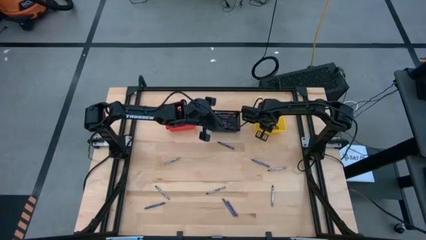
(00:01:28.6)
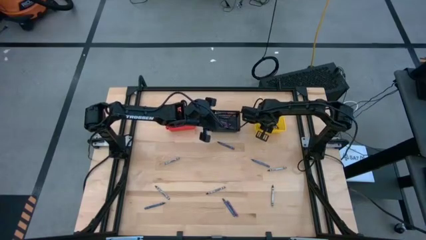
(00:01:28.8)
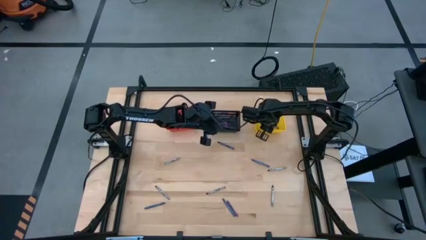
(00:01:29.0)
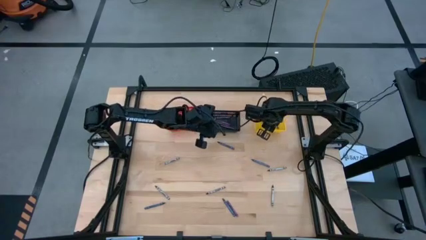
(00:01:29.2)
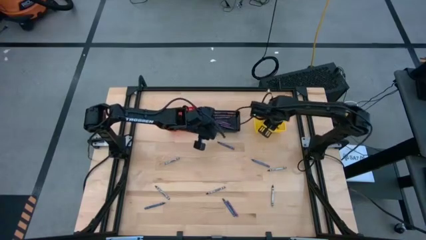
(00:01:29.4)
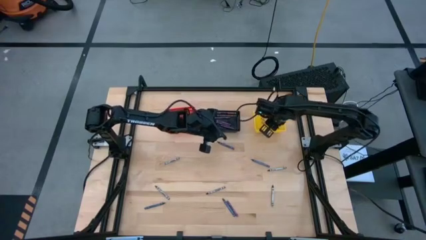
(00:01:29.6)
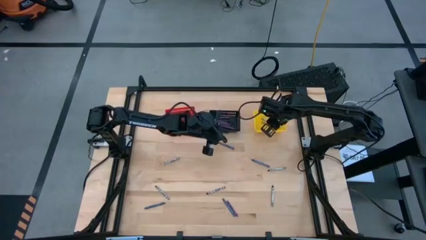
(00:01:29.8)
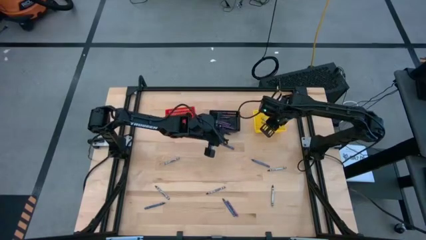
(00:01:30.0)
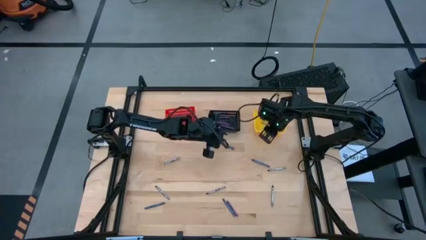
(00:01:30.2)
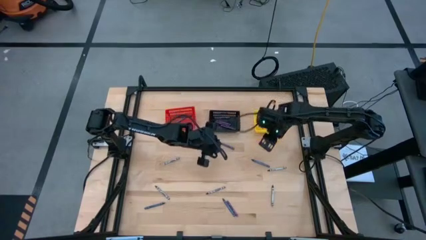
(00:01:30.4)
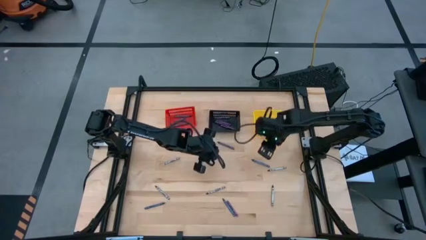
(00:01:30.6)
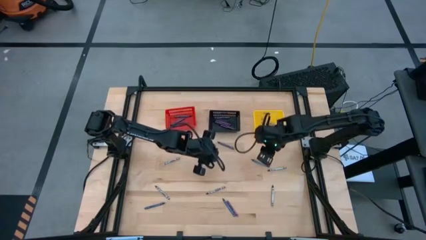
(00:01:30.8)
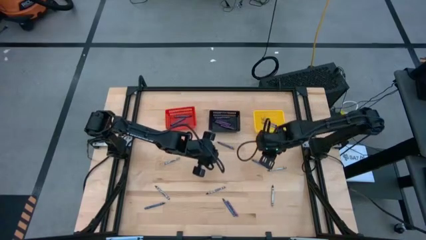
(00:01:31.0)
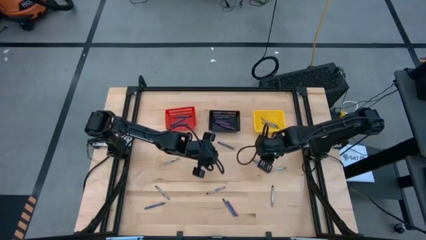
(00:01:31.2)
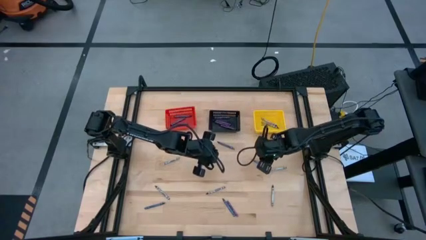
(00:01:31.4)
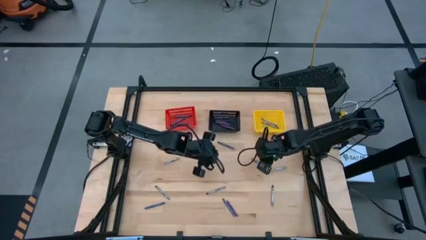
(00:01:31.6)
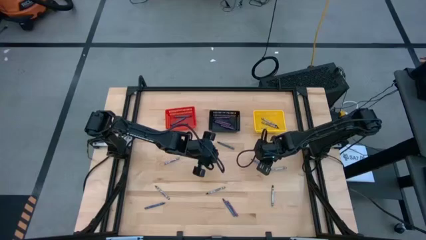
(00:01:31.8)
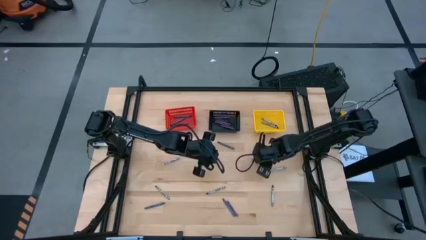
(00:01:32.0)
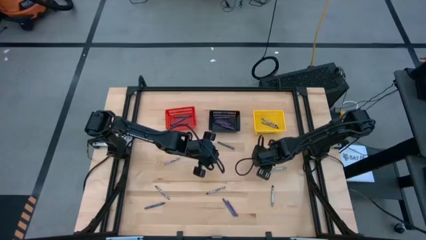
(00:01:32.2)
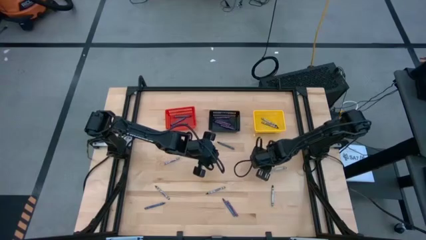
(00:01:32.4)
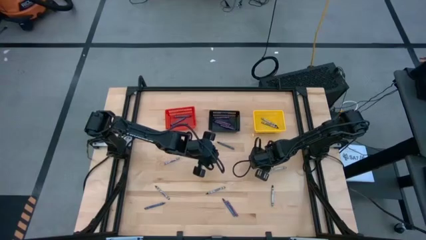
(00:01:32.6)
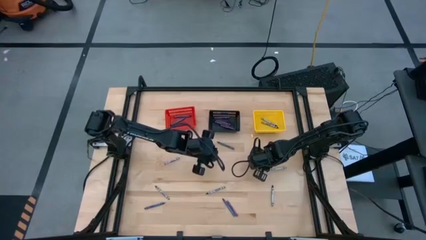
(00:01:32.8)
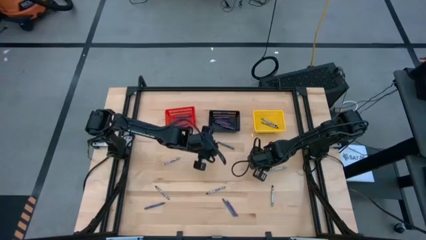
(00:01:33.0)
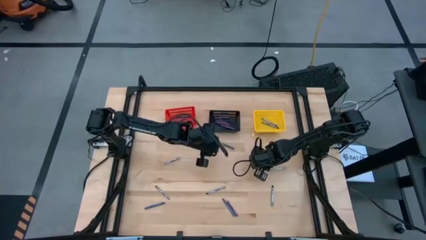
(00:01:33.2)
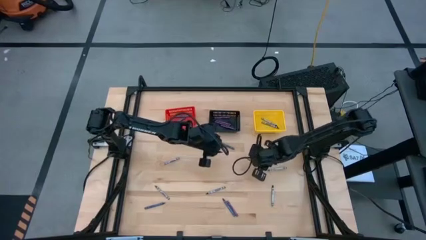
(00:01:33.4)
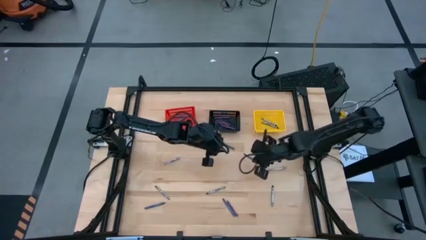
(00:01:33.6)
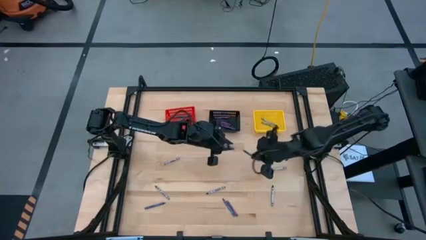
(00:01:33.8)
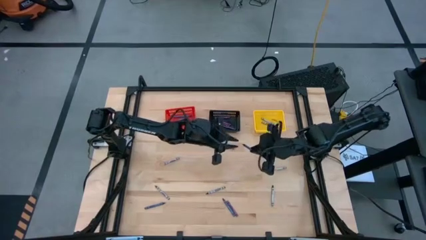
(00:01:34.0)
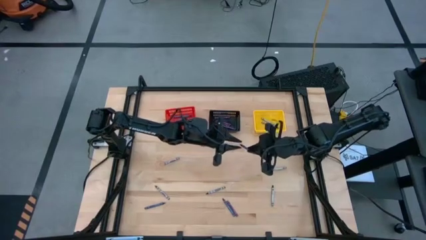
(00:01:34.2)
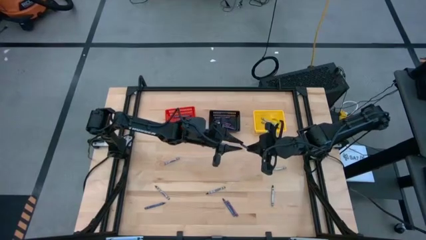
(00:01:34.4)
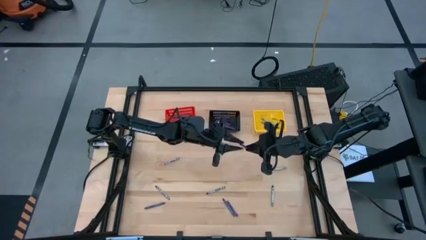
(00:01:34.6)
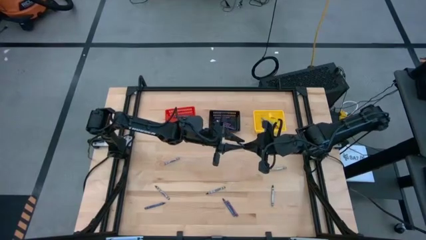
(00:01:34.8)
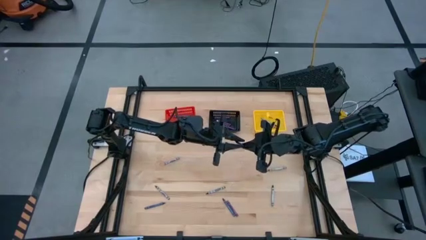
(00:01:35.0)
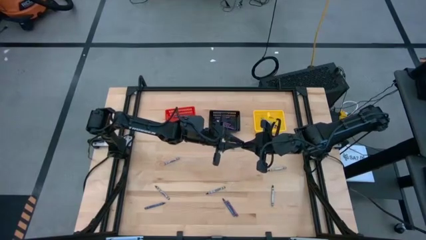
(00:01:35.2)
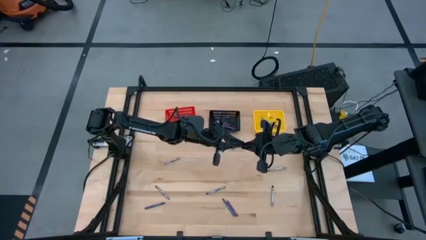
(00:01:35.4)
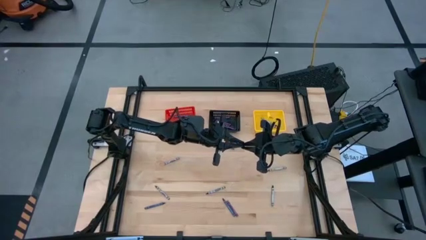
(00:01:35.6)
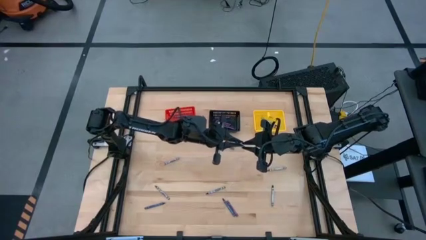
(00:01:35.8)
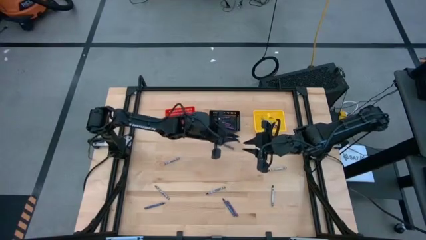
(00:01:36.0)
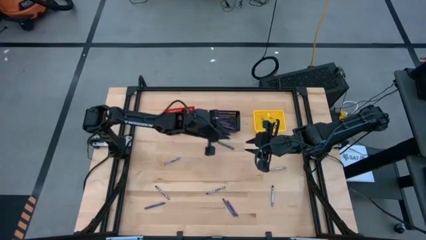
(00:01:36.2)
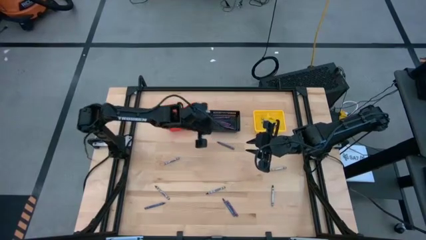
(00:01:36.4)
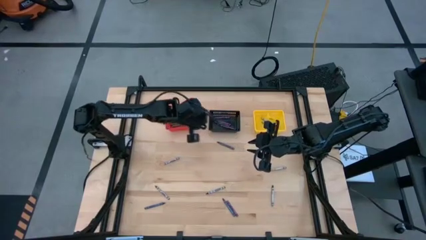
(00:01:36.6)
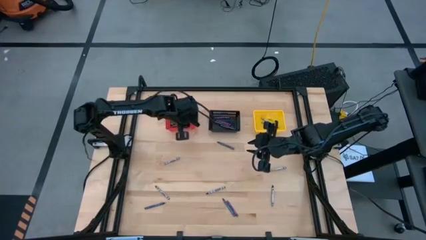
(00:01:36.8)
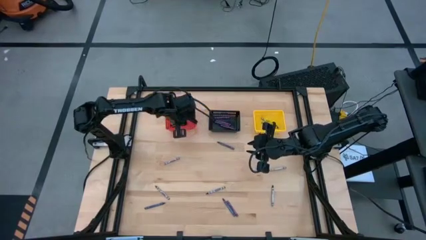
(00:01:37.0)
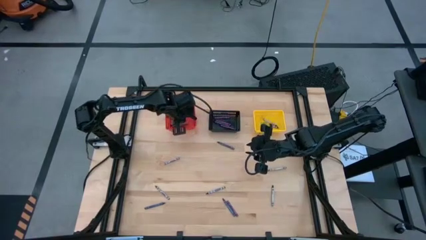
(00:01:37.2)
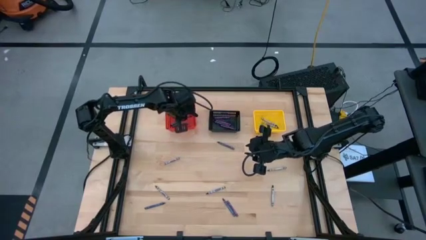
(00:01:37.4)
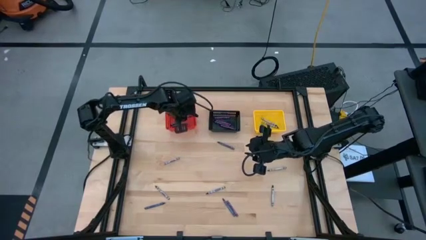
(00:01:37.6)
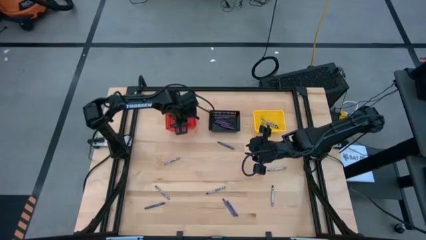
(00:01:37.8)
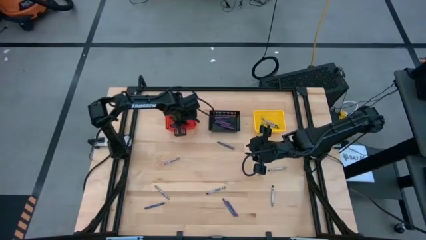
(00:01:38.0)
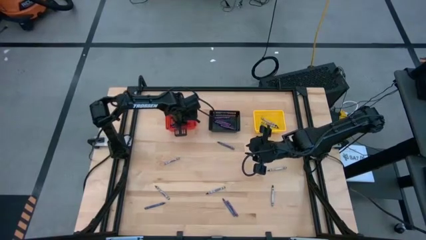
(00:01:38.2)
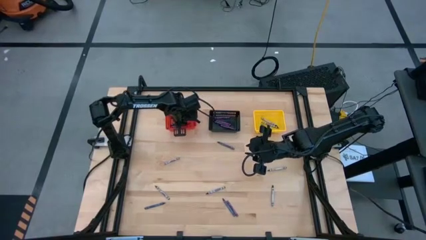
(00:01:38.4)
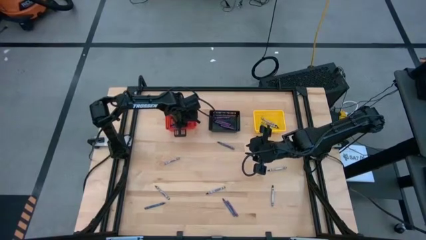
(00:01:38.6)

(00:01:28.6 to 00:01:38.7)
Task: Sort crayons
Put the blue crayon into the red bin

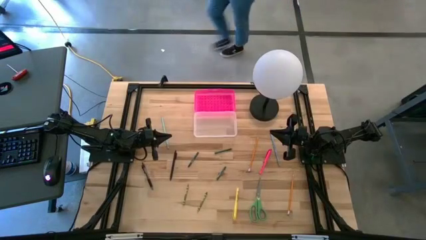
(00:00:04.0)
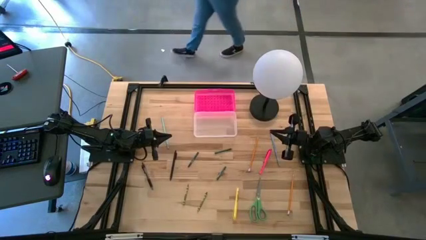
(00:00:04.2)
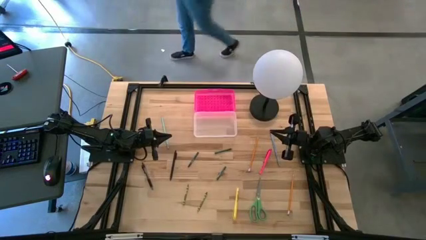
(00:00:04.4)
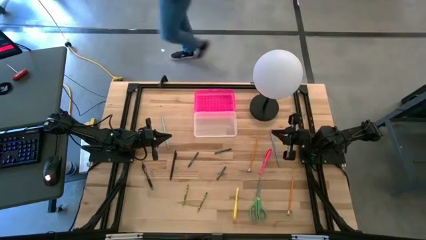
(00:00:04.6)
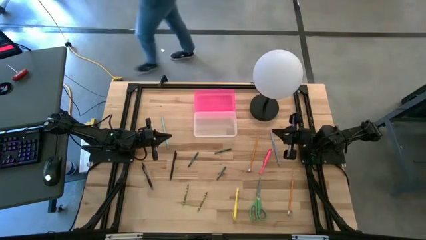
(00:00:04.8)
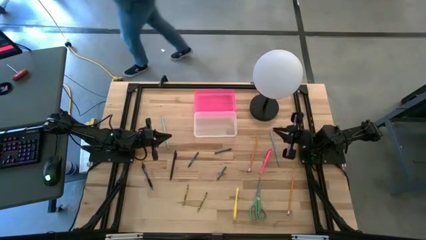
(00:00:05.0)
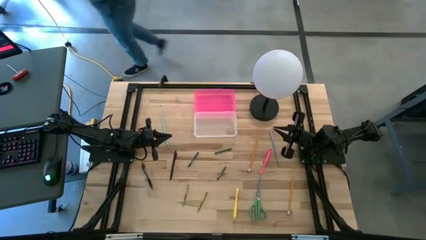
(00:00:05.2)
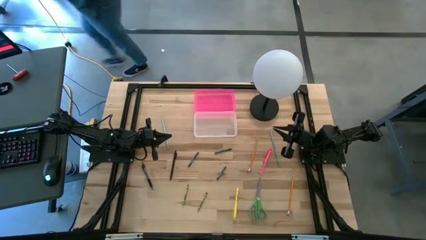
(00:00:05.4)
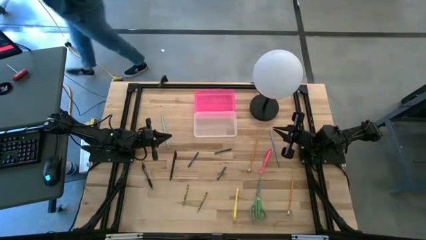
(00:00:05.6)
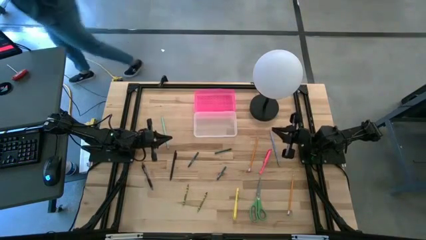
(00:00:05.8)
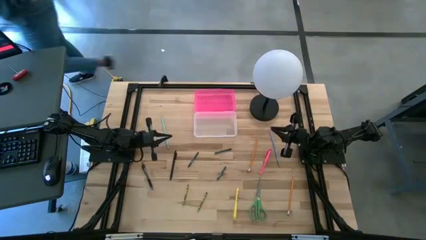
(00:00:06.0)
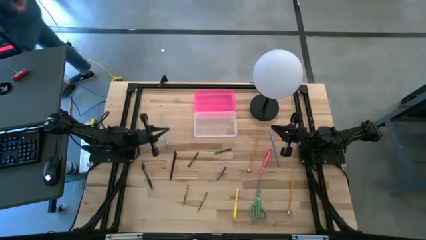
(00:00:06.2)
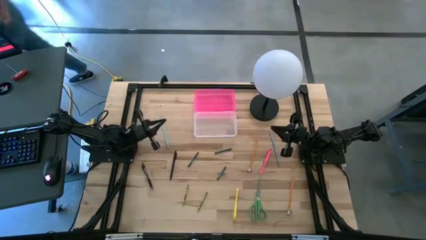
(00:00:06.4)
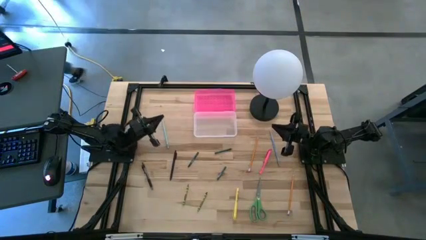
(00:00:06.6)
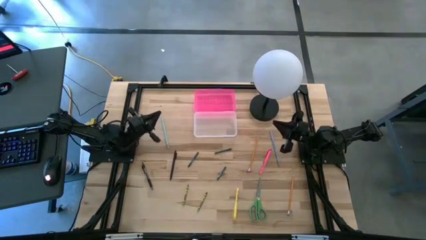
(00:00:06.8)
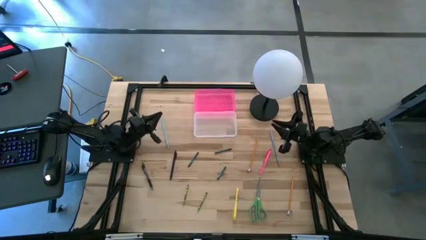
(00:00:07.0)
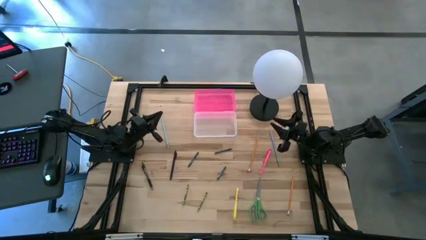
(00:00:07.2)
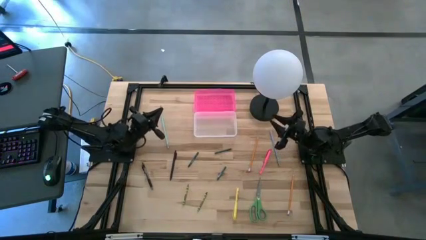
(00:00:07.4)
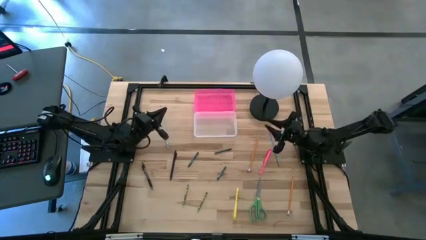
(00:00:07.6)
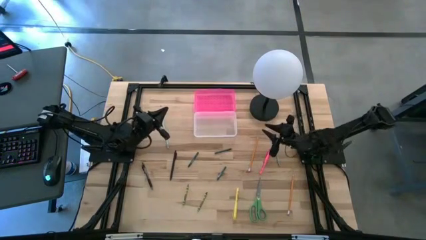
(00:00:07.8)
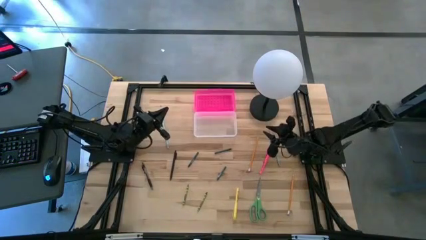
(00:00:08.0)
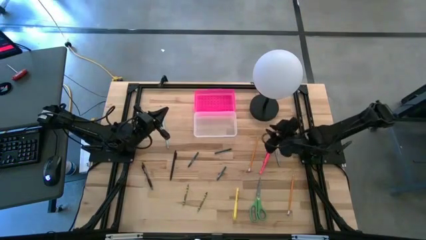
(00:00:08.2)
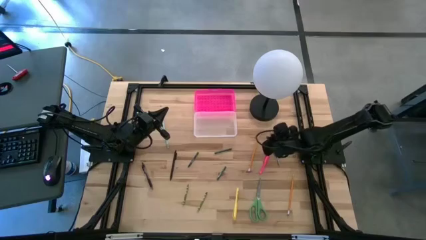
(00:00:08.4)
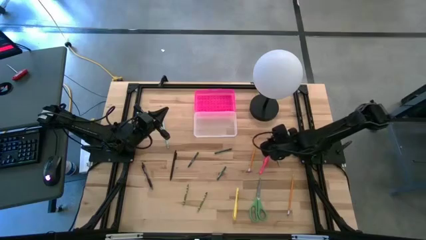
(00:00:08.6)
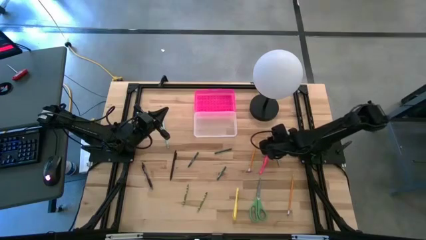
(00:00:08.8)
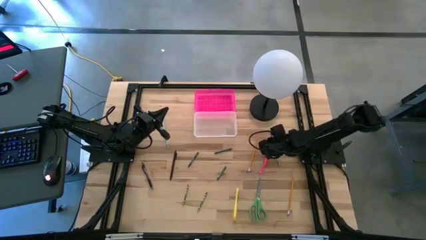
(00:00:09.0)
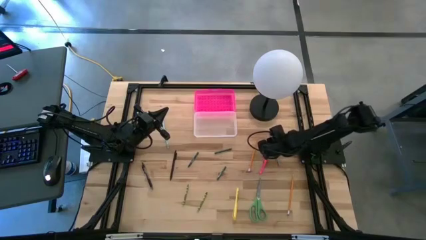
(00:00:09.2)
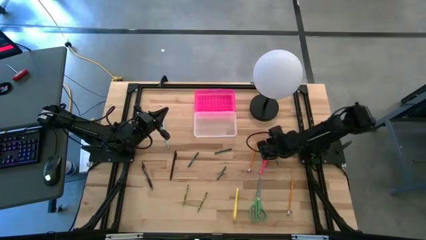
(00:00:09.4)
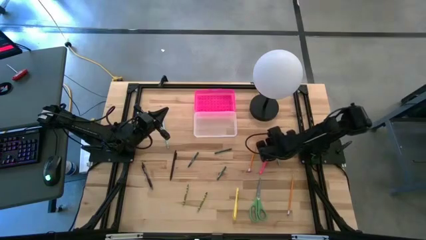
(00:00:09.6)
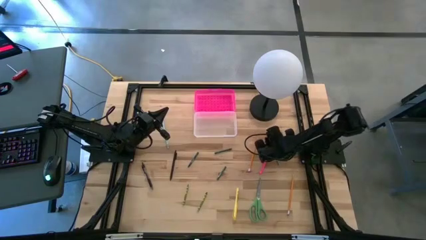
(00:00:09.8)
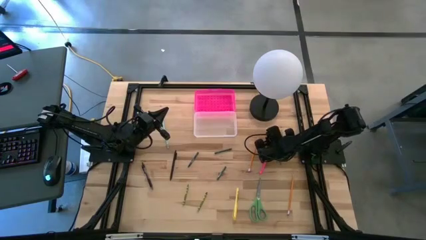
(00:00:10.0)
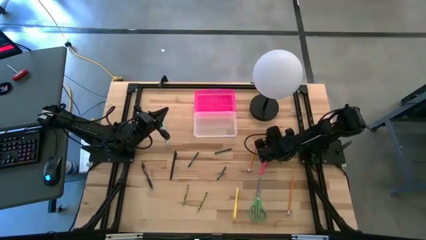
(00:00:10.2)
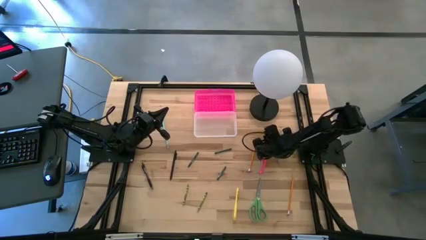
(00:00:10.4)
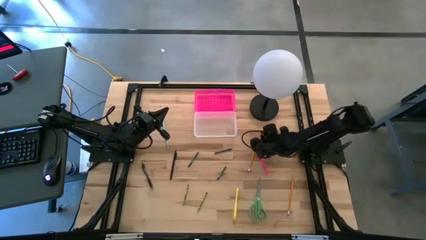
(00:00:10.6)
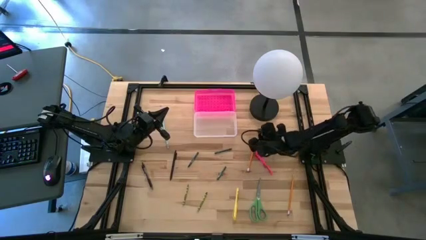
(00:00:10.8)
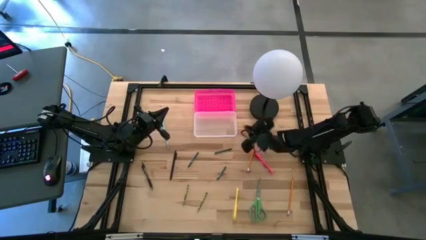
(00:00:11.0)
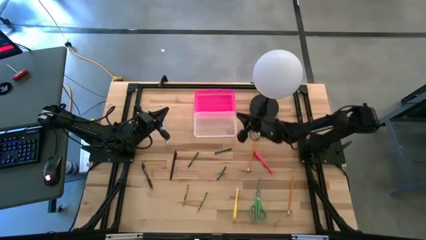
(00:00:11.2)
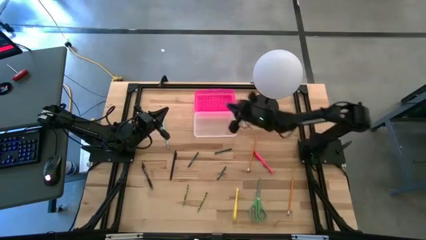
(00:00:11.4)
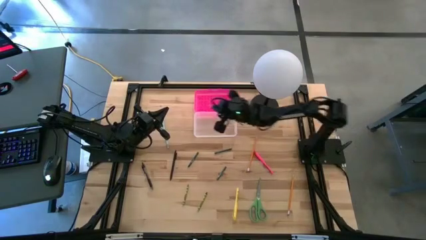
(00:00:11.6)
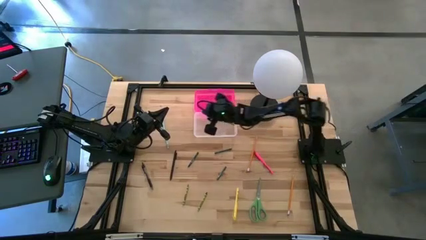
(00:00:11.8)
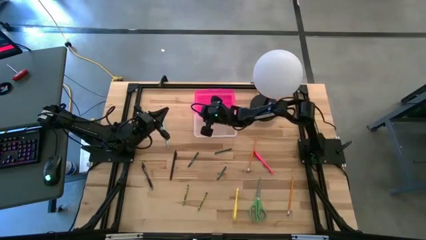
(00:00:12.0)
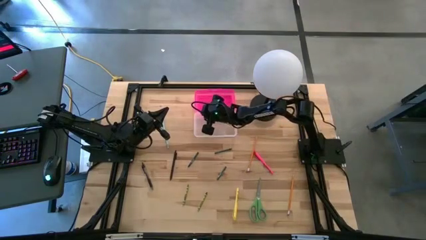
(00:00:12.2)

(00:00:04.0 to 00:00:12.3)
Task: Pick & place school supplies into a supply box
Put the blue pencil into the transparent supply box
